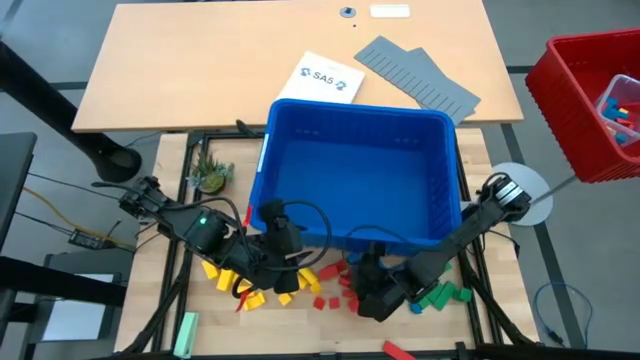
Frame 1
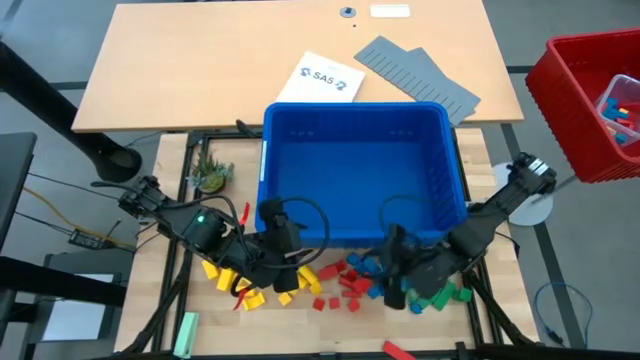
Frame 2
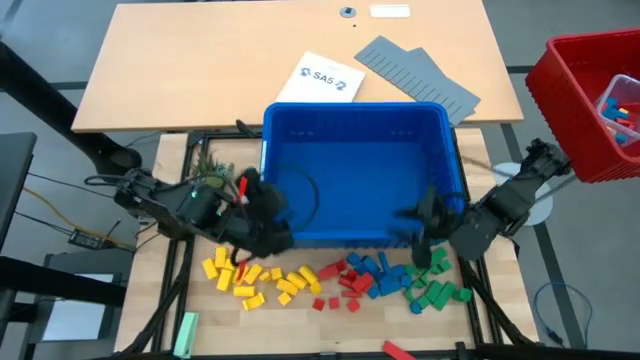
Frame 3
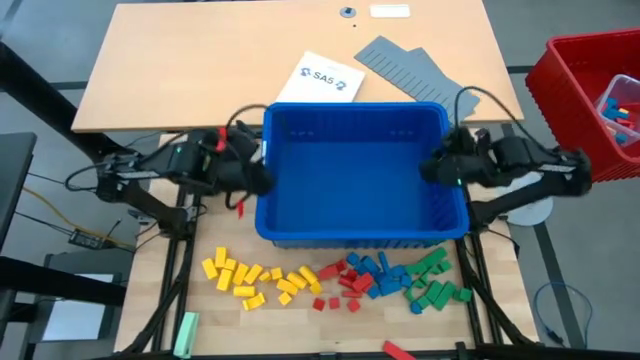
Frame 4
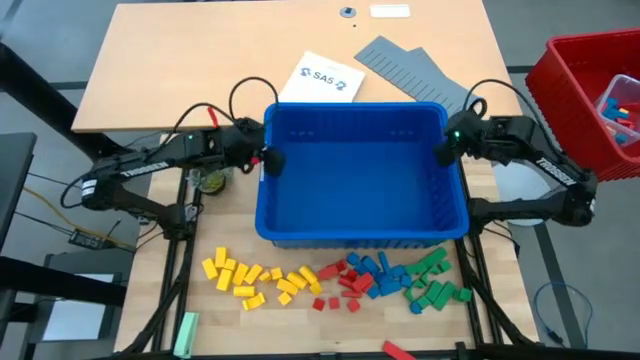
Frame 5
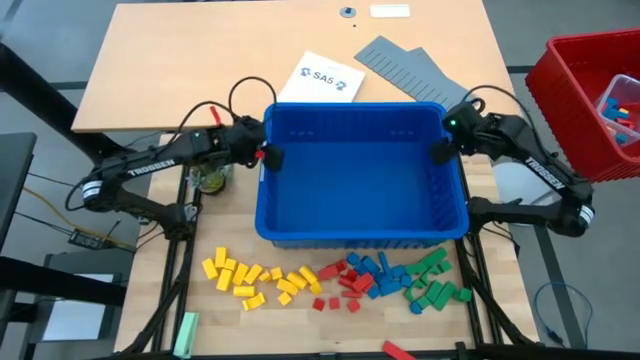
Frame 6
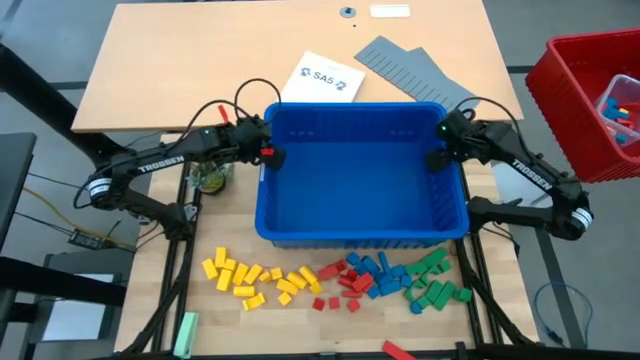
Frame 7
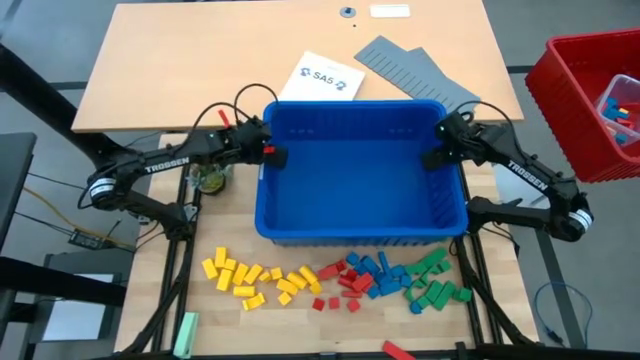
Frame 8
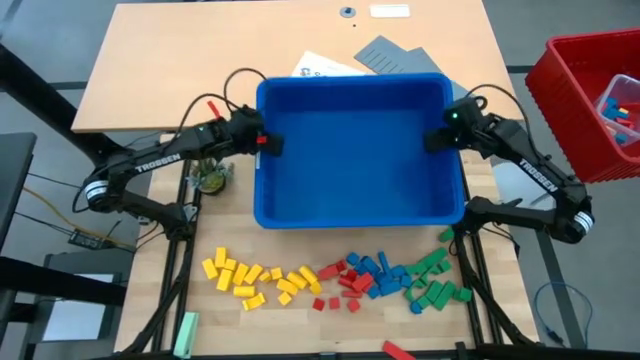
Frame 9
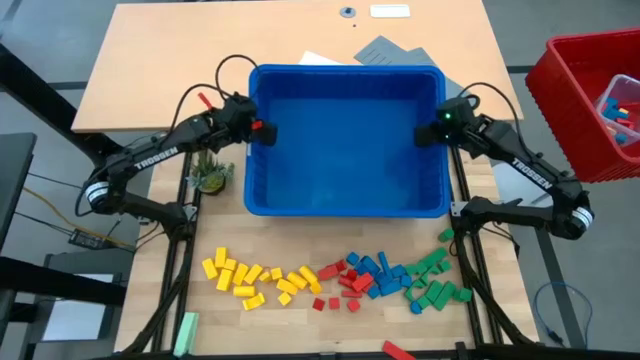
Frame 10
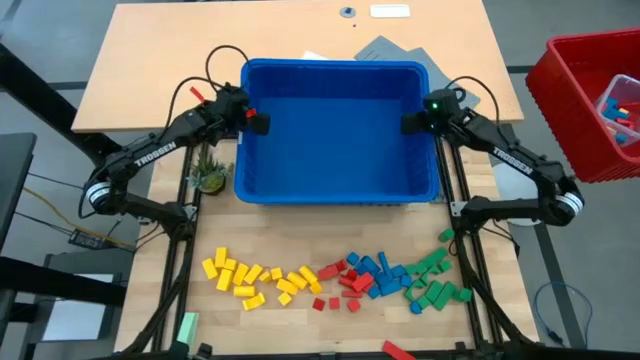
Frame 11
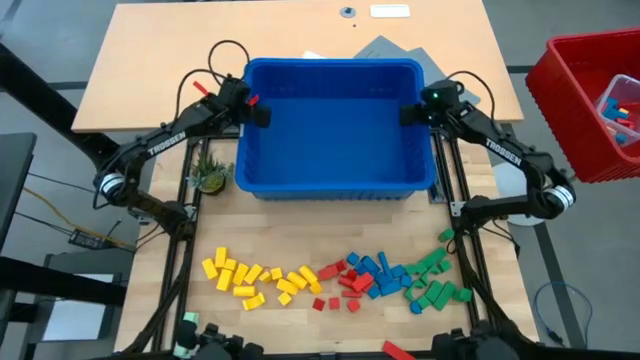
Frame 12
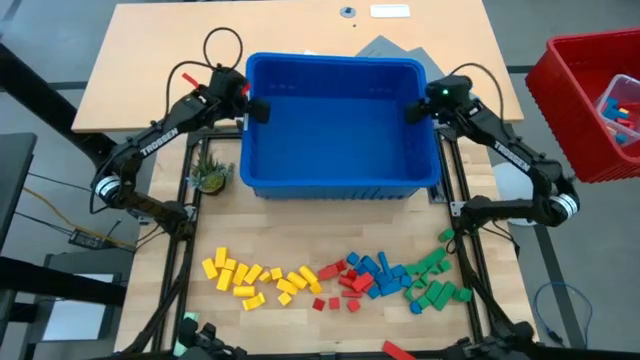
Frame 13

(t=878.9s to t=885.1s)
Task: Sort blocks
Adjust the blue bin

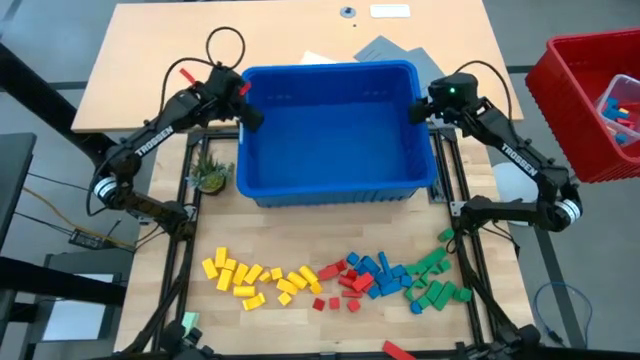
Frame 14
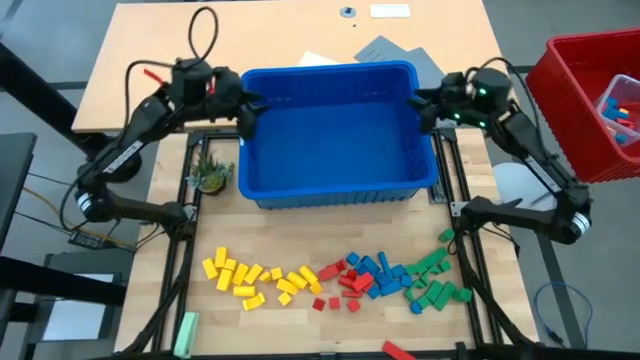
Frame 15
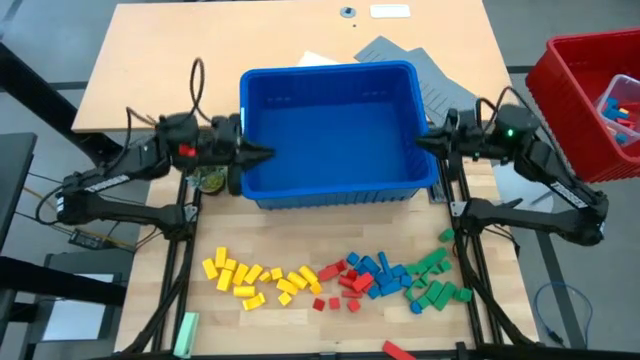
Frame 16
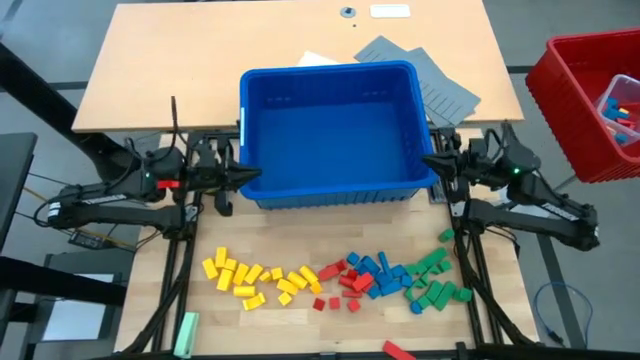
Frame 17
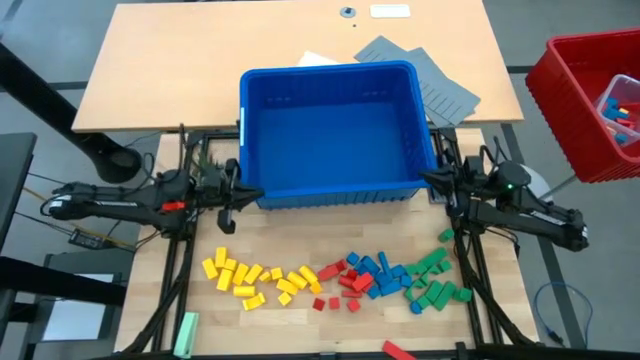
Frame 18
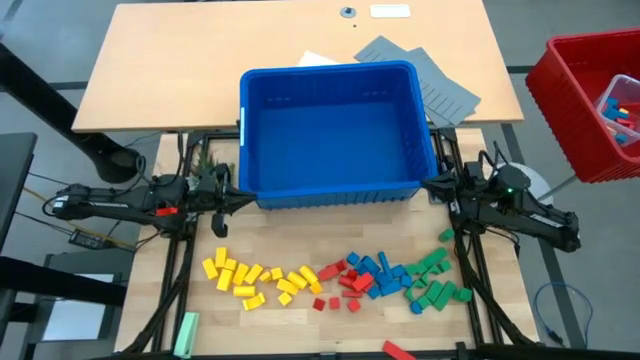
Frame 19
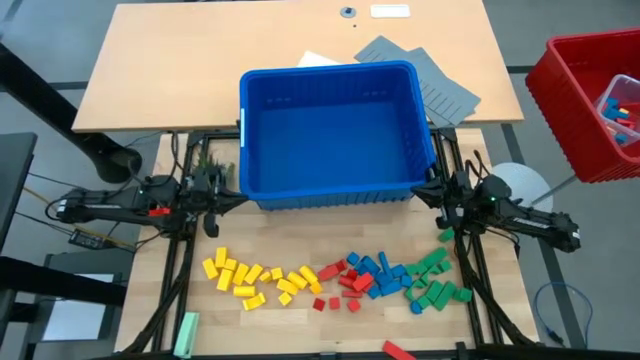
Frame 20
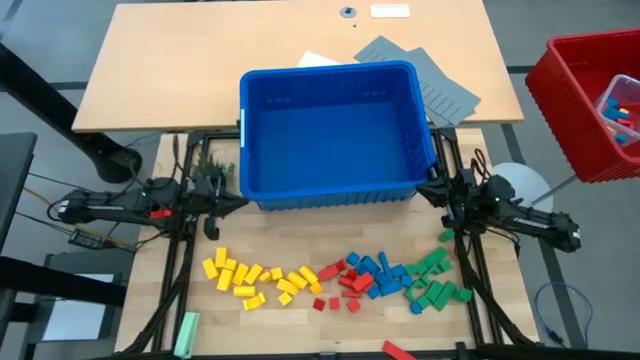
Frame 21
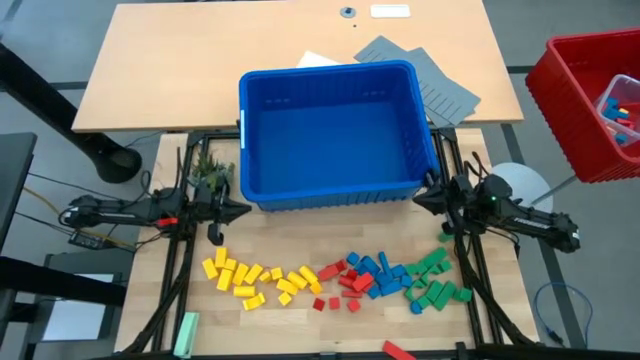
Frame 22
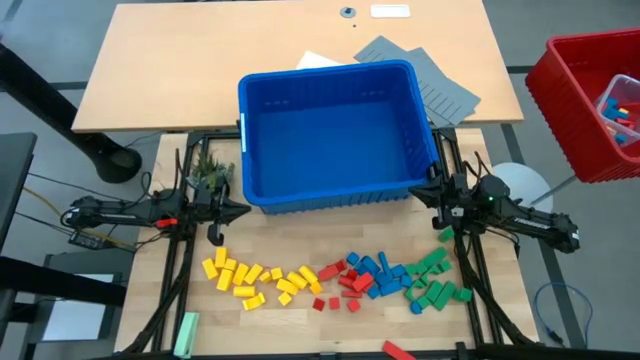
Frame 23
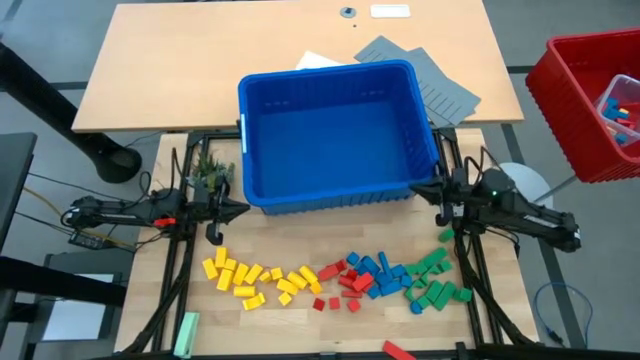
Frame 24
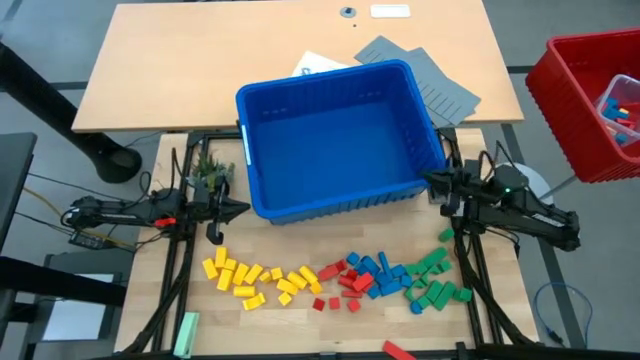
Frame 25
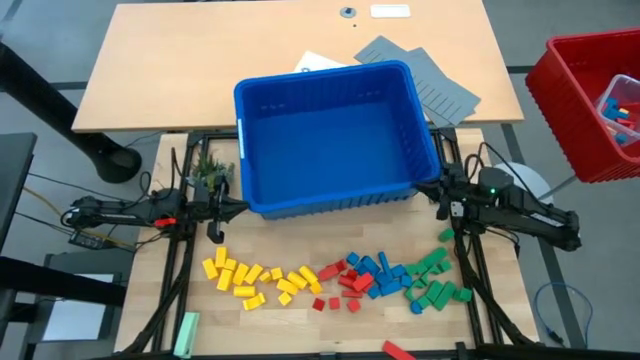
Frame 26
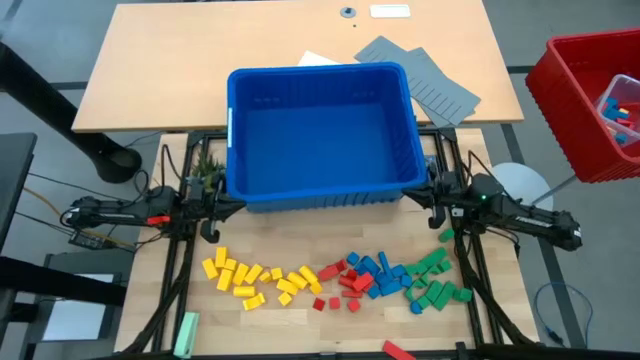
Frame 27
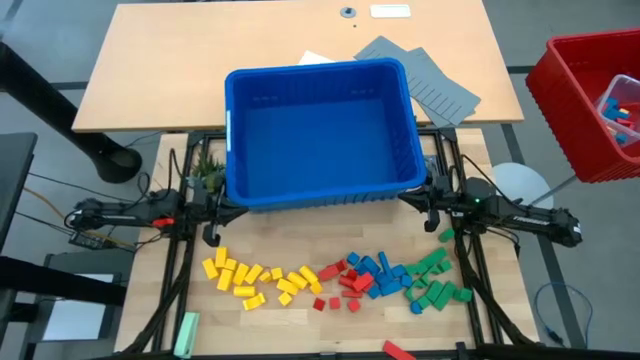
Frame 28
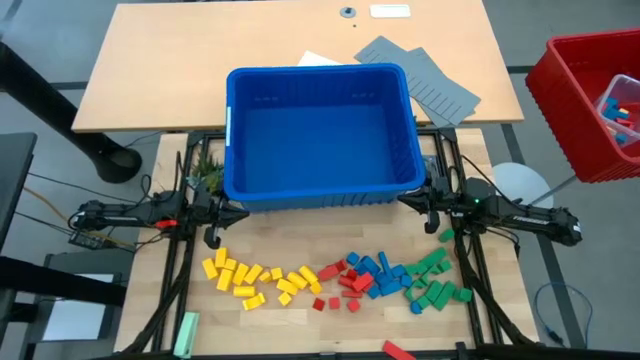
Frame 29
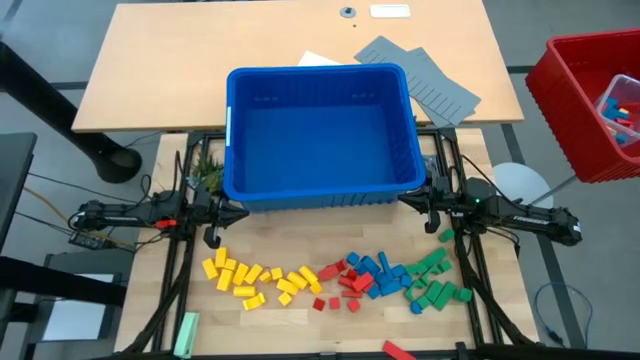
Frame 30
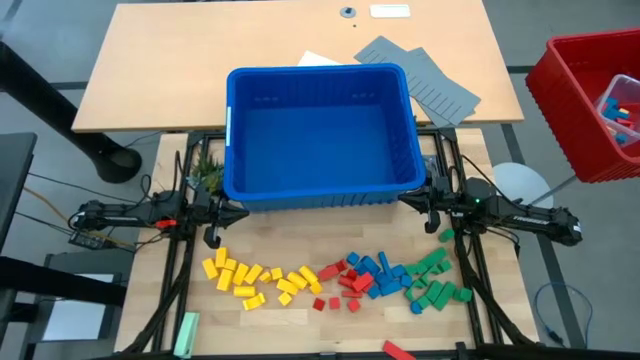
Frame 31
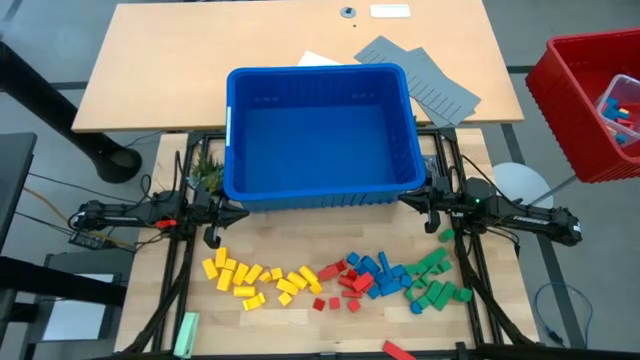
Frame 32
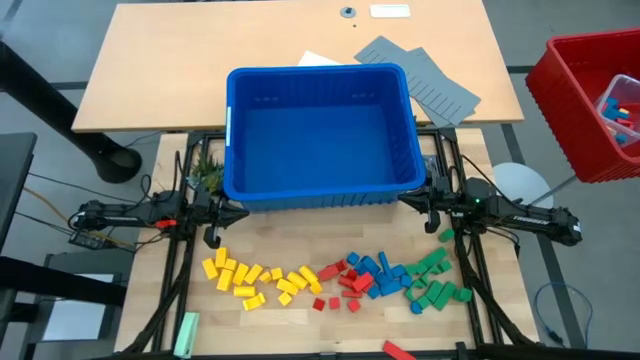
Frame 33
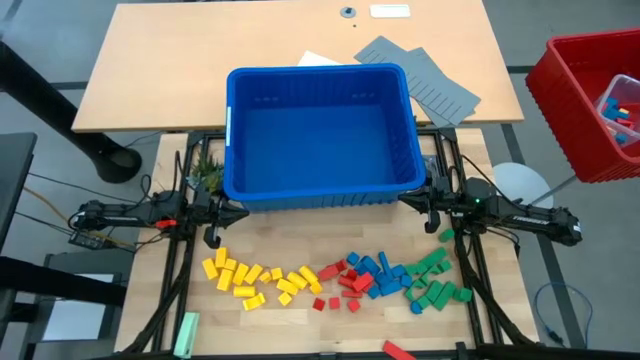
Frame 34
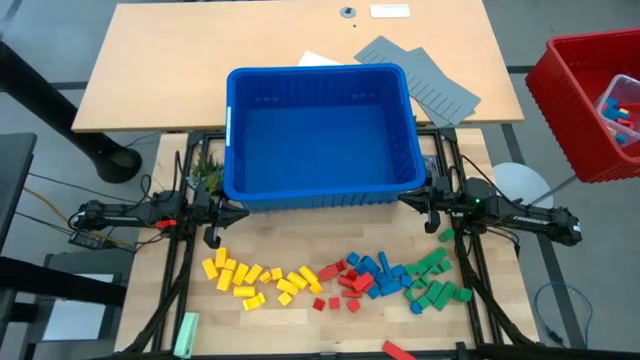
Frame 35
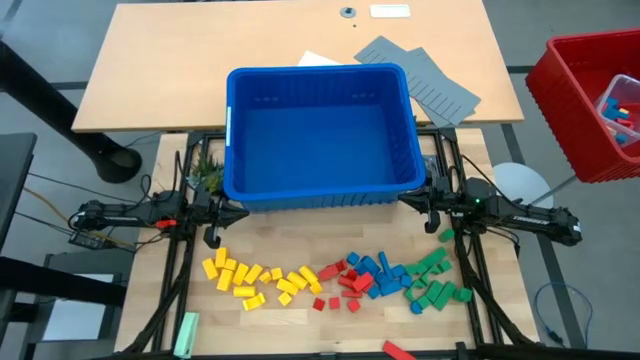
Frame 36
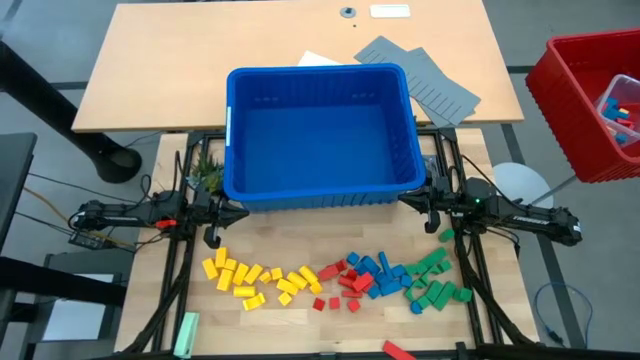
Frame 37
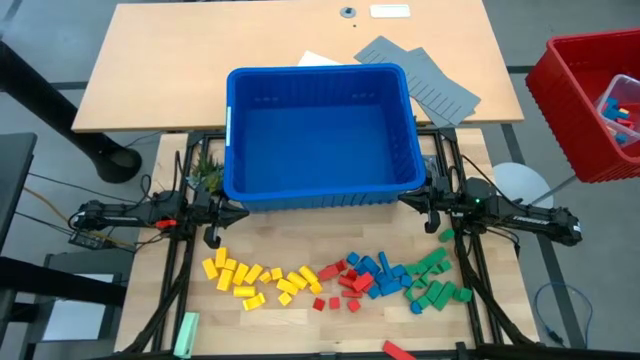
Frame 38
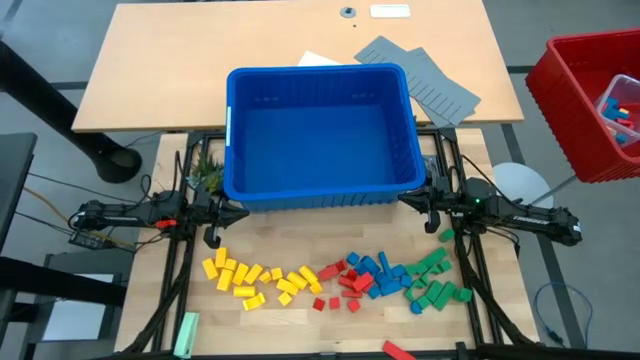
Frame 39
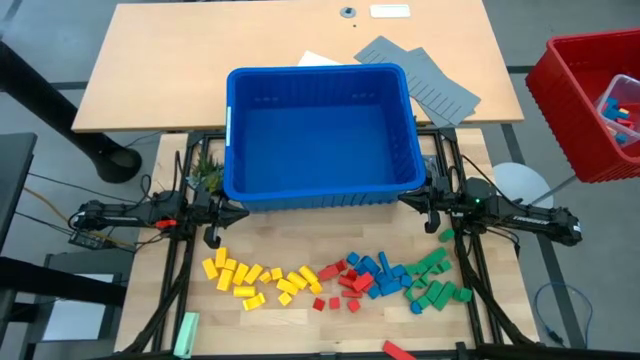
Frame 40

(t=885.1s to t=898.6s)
Return to Home Position
